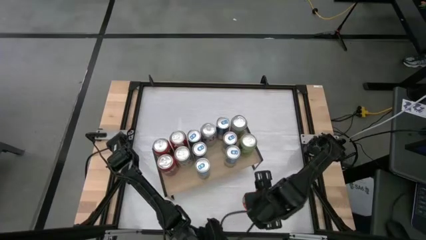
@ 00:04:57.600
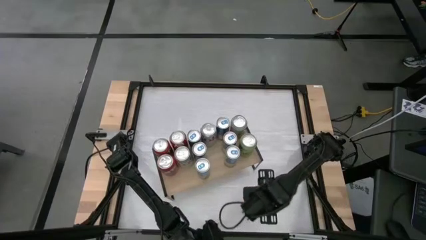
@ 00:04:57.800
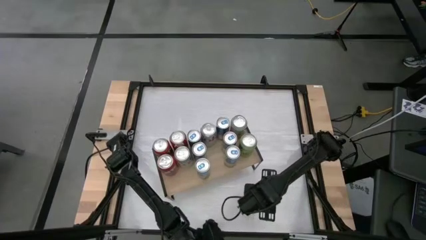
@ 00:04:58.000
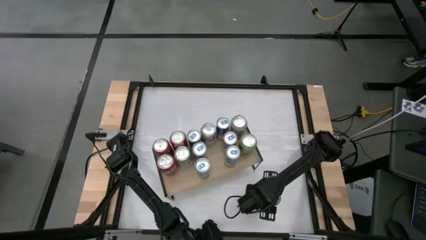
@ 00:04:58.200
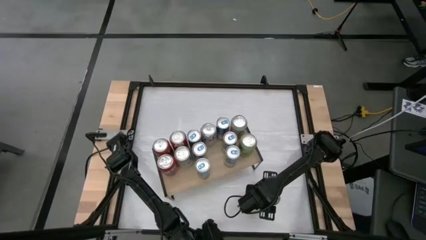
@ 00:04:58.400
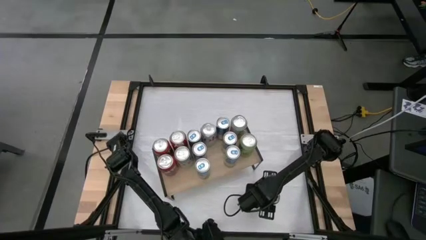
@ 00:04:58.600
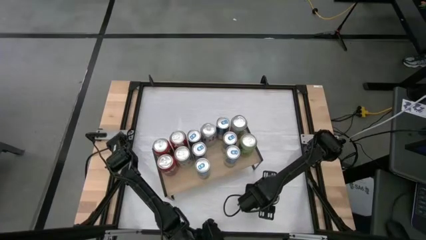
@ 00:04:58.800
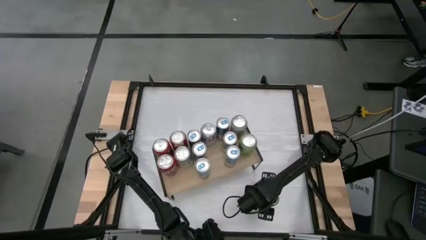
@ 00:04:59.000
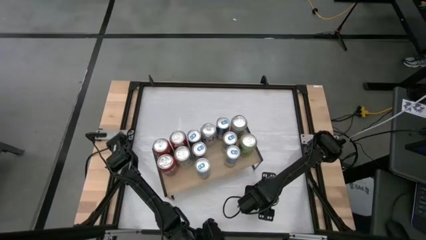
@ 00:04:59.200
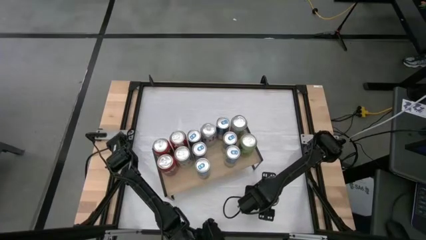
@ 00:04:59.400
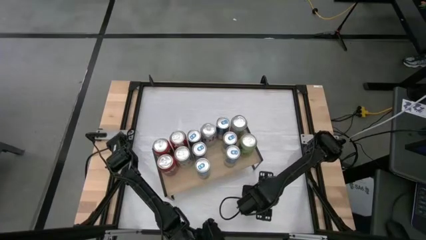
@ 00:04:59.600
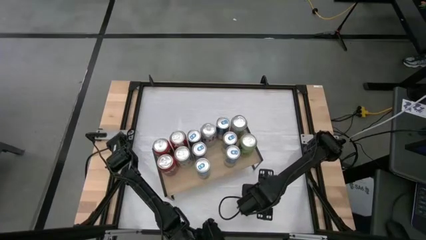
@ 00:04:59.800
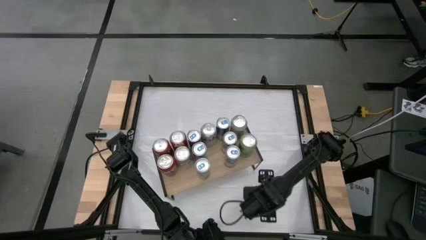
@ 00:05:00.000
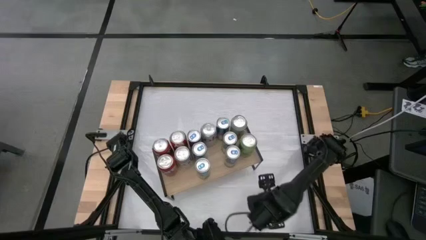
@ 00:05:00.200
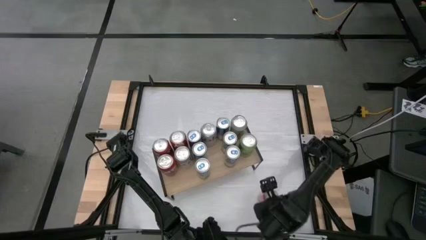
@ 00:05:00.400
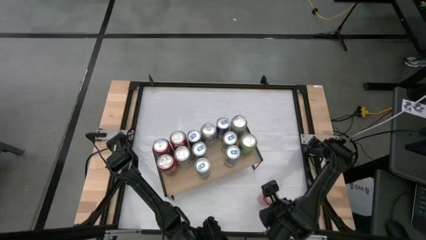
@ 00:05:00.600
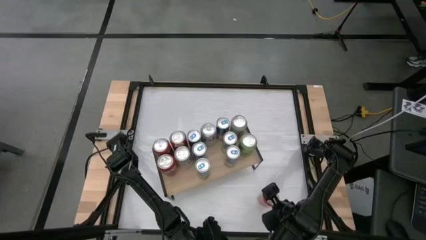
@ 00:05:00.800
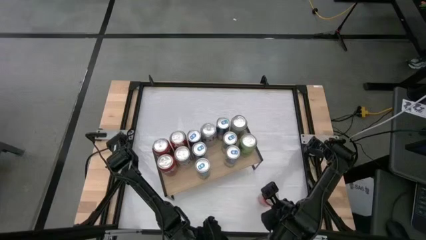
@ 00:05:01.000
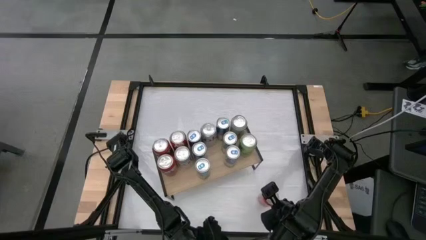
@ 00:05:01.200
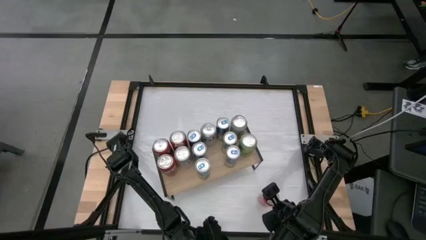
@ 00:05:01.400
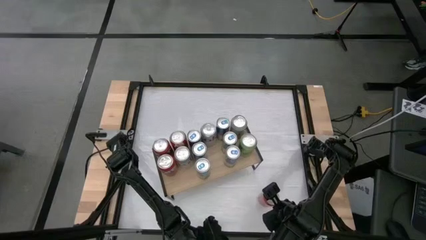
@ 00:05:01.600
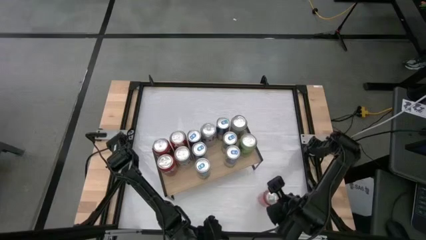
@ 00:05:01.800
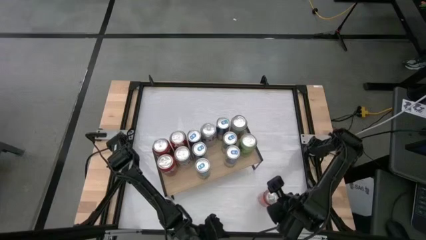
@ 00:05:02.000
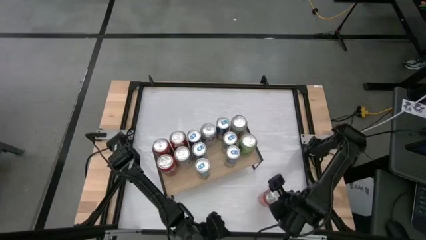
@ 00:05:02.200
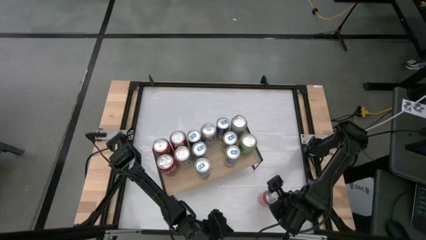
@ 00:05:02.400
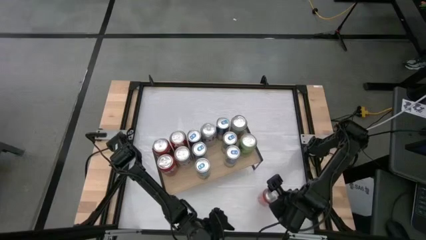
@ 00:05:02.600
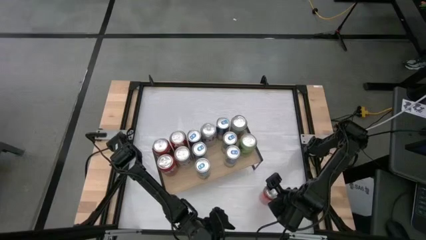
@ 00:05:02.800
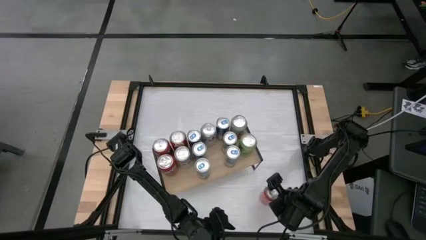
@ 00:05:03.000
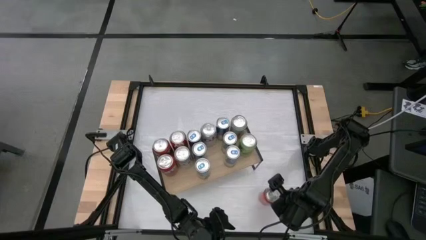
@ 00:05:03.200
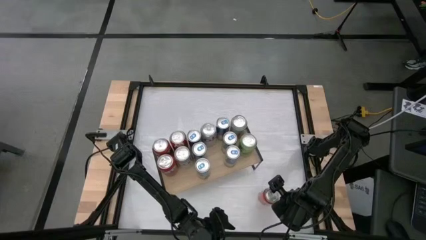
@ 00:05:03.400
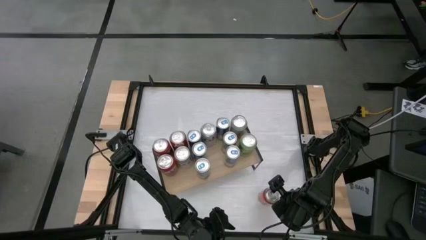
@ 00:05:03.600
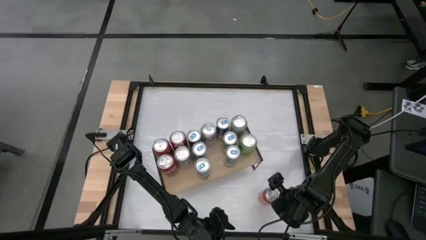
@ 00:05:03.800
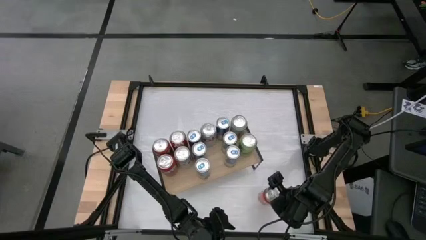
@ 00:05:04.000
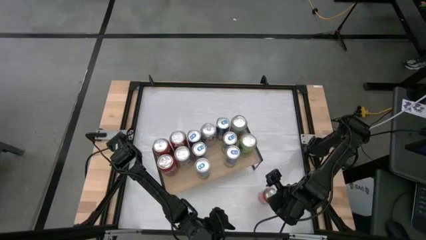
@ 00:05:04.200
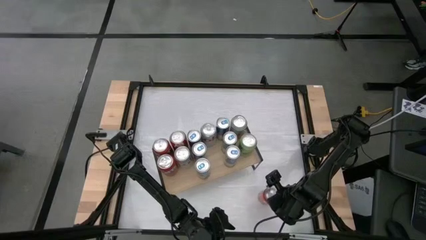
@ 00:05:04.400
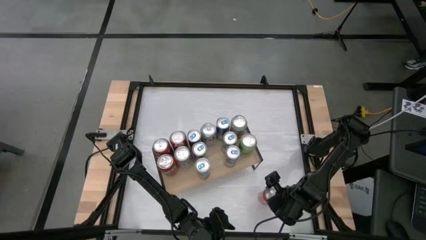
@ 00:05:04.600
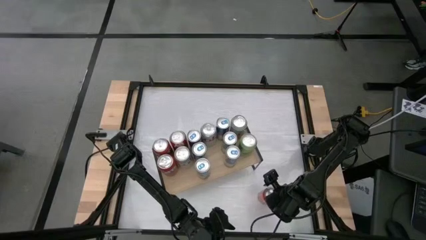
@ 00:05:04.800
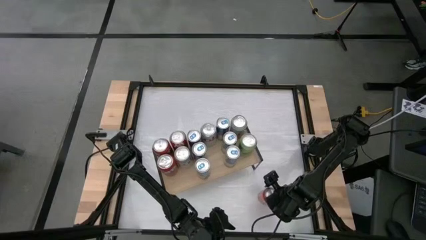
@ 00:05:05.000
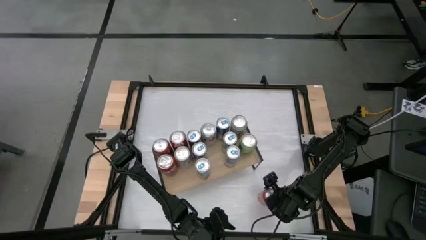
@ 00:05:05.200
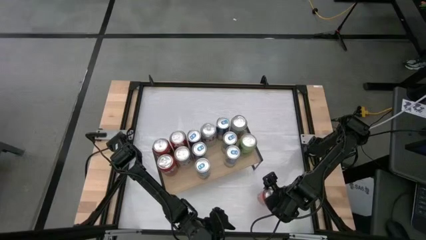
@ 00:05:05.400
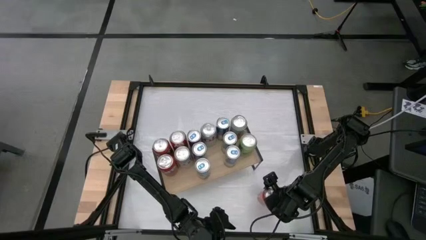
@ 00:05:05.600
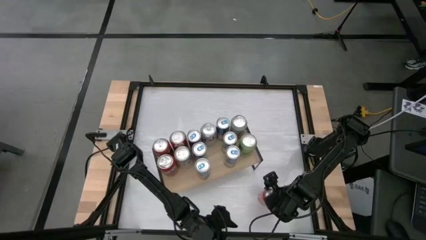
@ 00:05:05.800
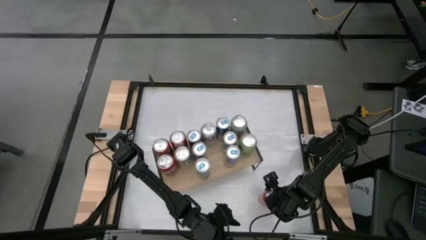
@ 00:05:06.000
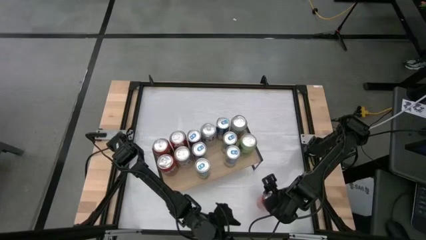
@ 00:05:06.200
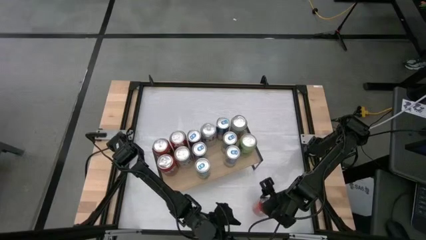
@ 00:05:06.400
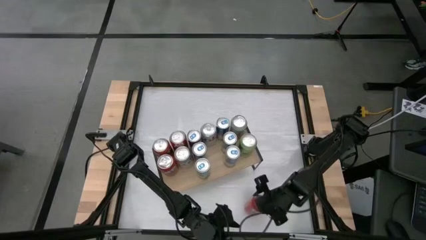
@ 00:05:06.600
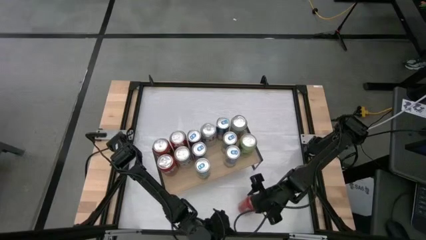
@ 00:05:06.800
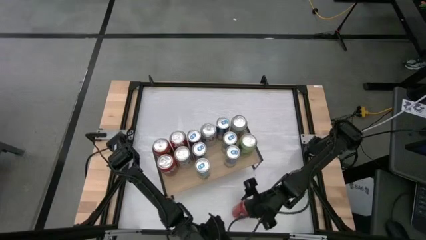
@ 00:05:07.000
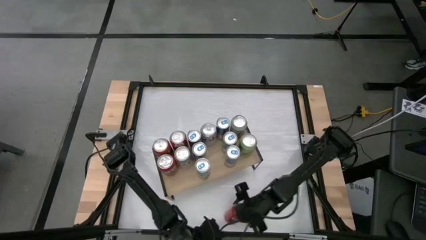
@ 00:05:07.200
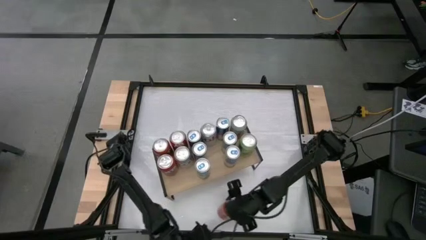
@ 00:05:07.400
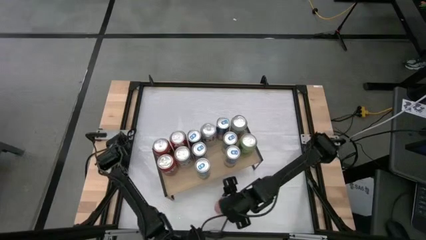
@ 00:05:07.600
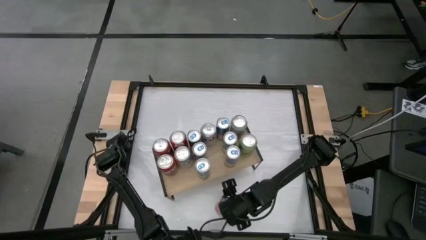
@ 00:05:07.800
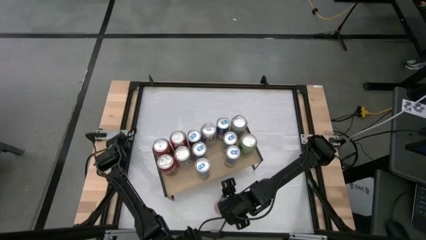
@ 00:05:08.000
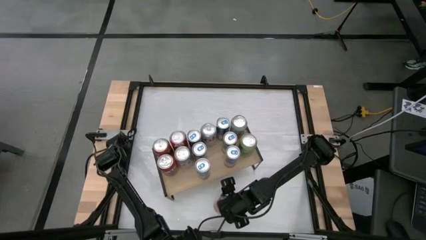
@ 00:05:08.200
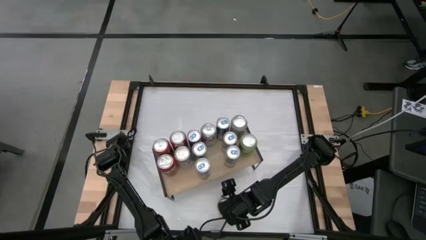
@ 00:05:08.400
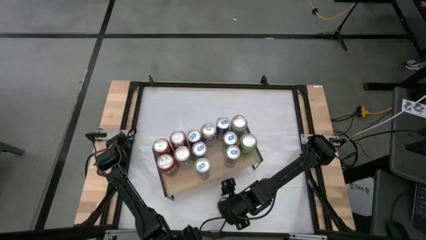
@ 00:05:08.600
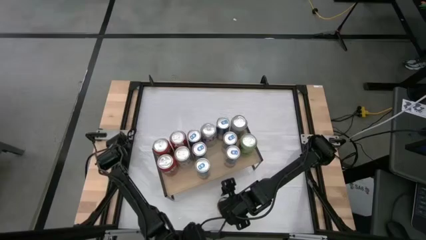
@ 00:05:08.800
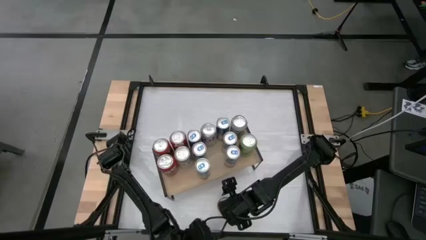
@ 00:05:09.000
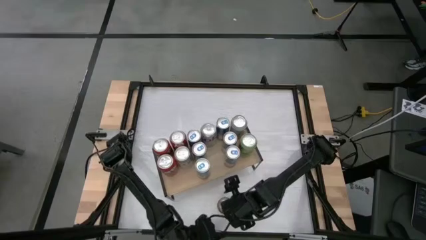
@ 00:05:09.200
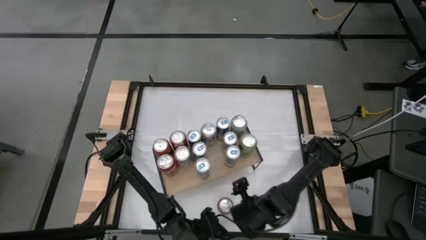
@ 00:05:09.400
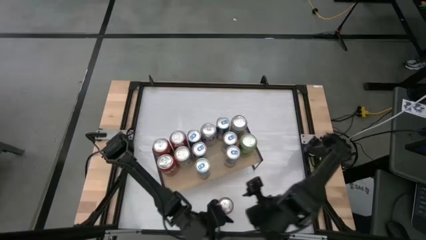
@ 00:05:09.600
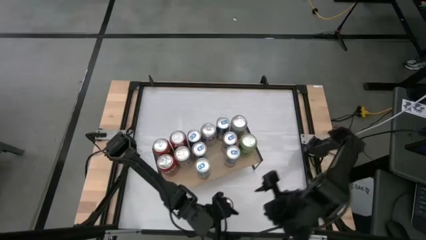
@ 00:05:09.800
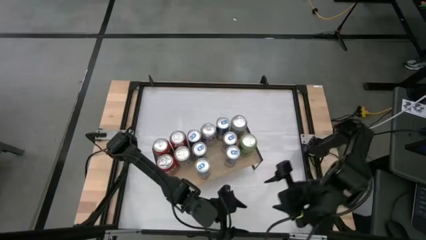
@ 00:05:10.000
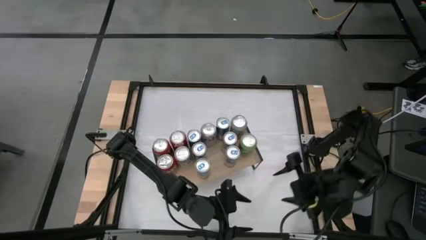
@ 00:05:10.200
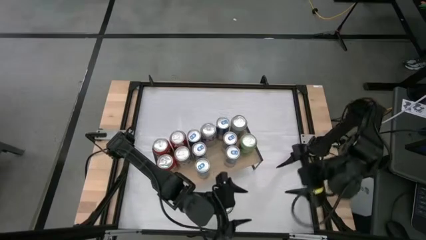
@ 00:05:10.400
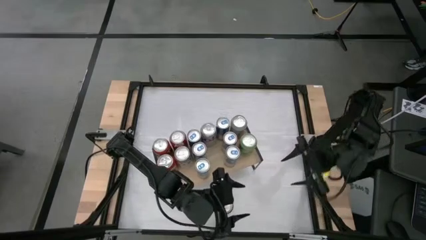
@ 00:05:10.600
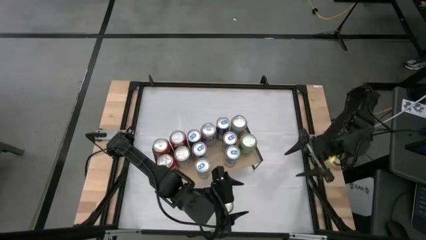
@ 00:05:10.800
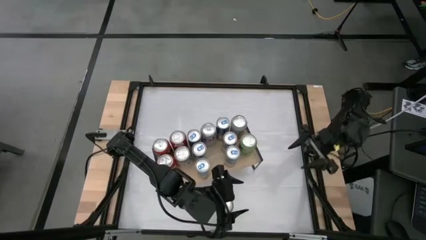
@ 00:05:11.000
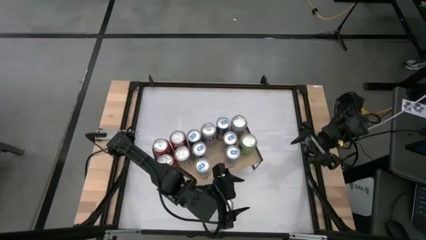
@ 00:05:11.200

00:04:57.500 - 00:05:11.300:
Task: Place canned beverage on shelf
Put the red soda can on the shelf

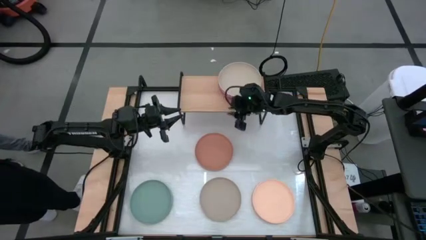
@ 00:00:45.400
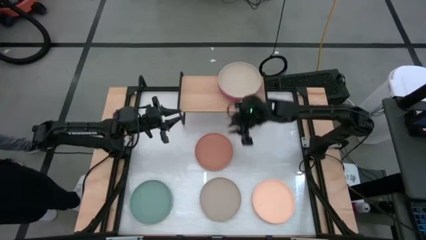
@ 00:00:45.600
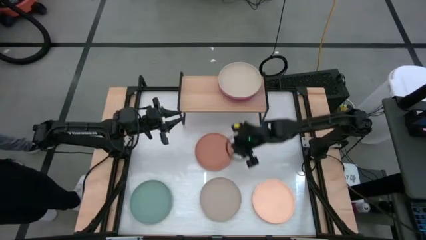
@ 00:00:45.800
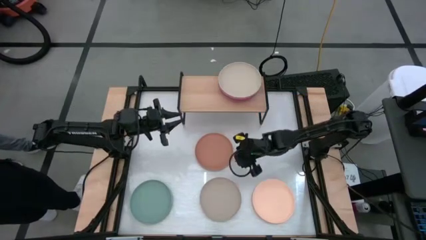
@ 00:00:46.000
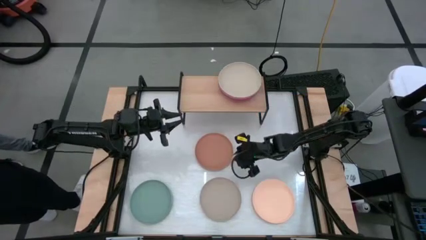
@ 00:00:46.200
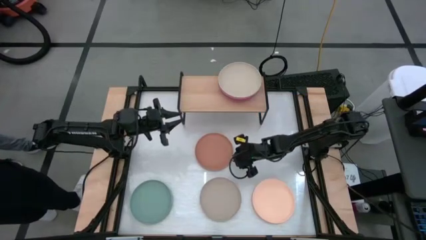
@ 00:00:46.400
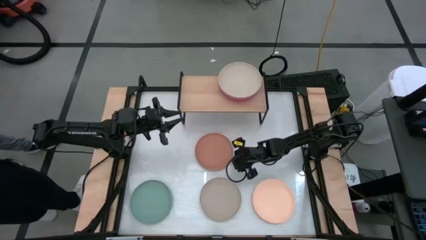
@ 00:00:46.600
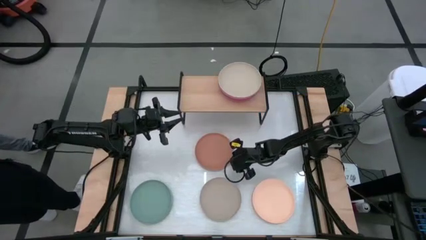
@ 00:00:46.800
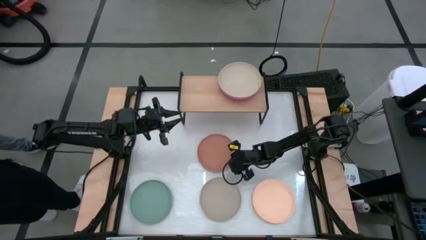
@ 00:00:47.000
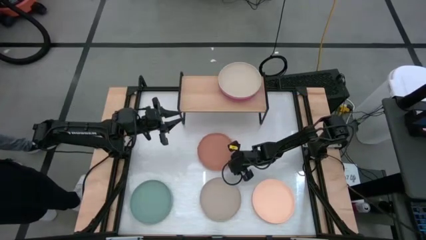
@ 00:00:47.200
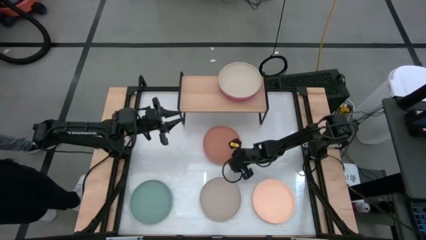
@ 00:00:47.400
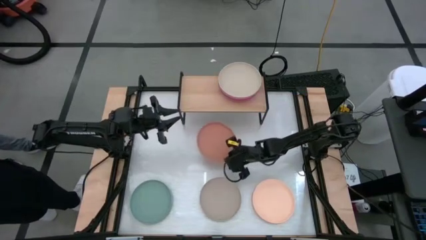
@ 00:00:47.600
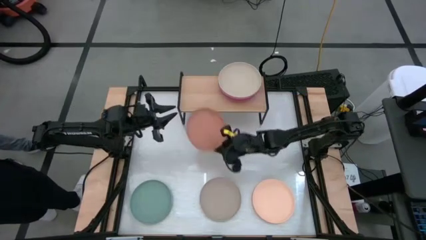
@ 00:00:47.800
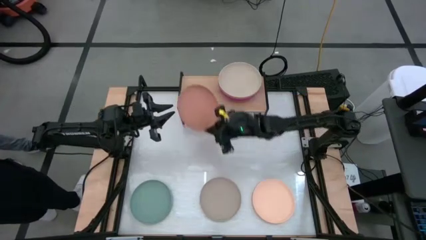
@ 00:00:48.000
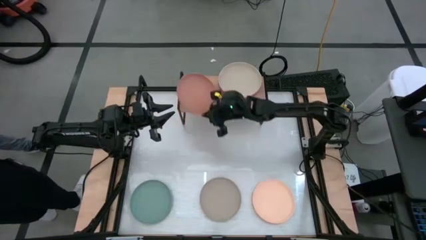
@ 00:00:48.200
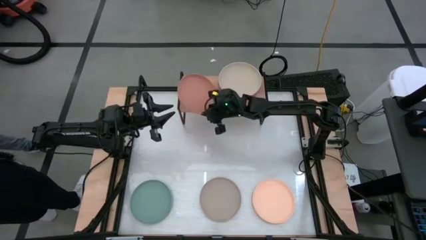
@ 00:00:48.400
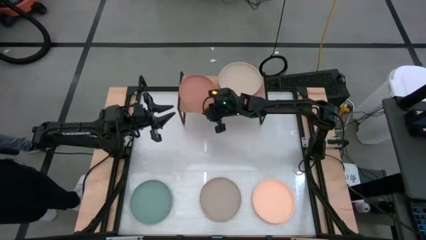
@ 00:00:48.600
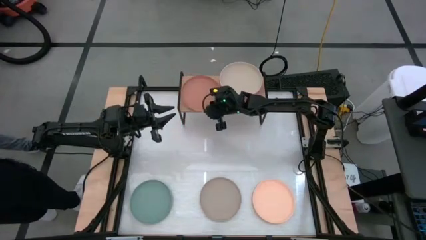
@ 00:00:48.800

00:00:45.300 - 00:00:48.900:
Task: Place and stack plates onto a shelf
Put the brown plate on the shelf
